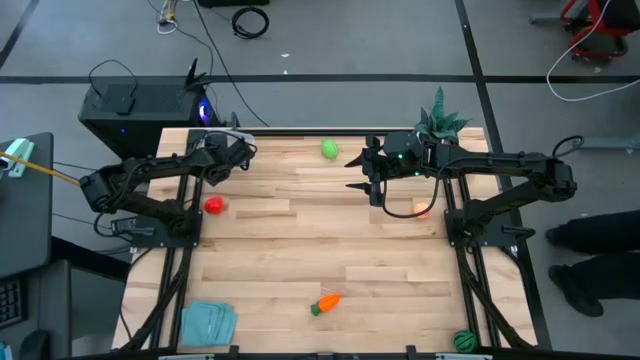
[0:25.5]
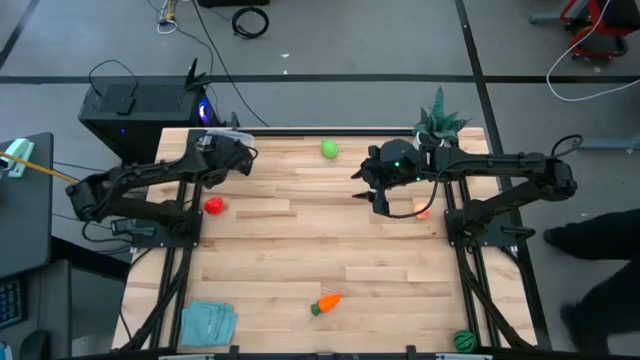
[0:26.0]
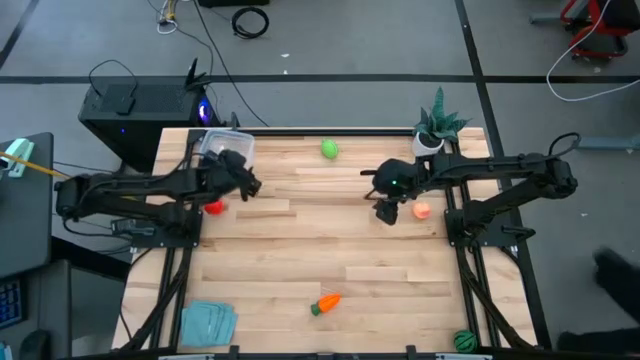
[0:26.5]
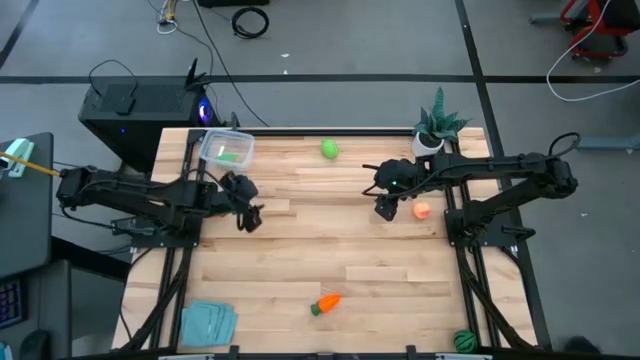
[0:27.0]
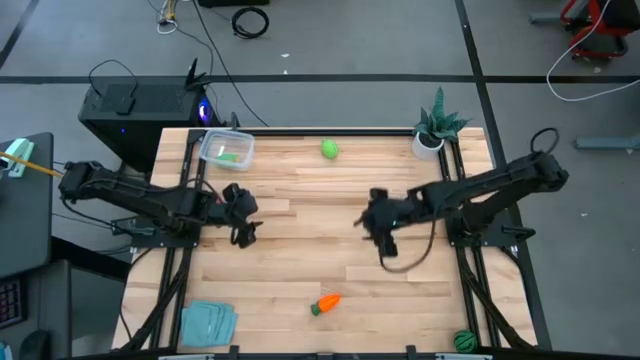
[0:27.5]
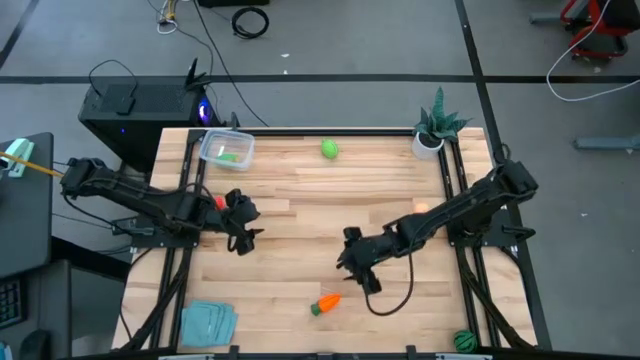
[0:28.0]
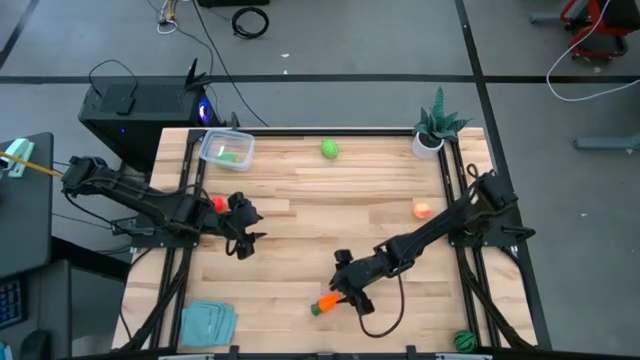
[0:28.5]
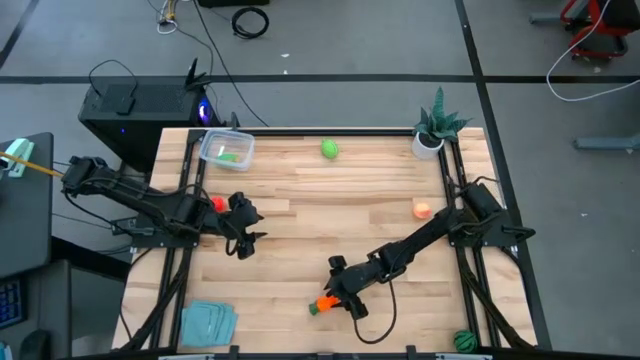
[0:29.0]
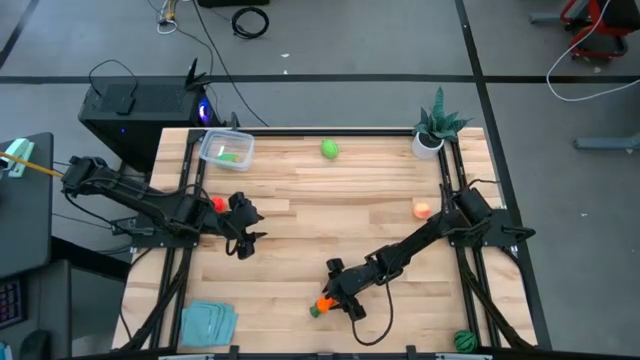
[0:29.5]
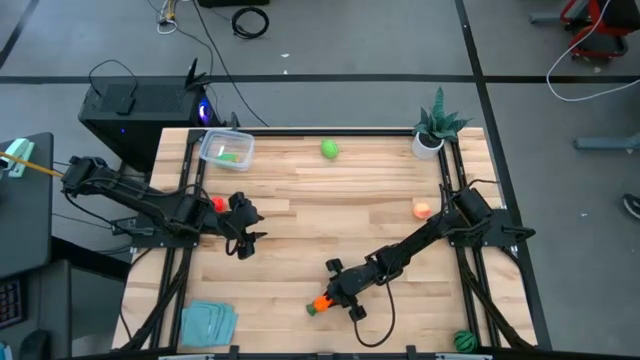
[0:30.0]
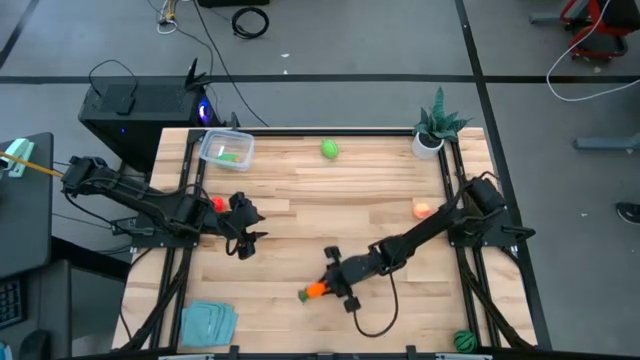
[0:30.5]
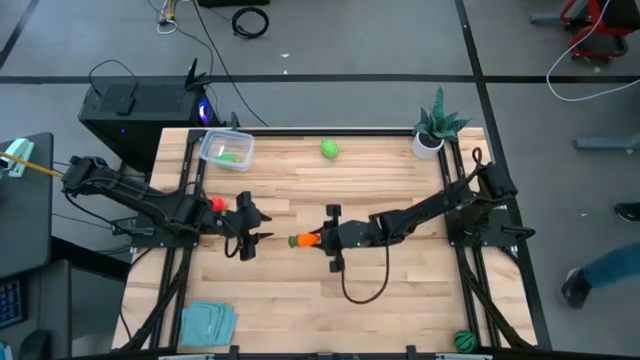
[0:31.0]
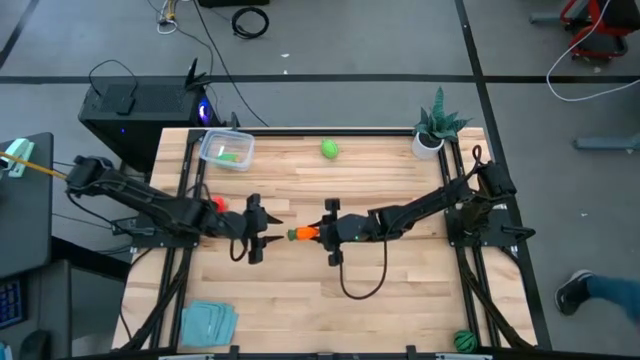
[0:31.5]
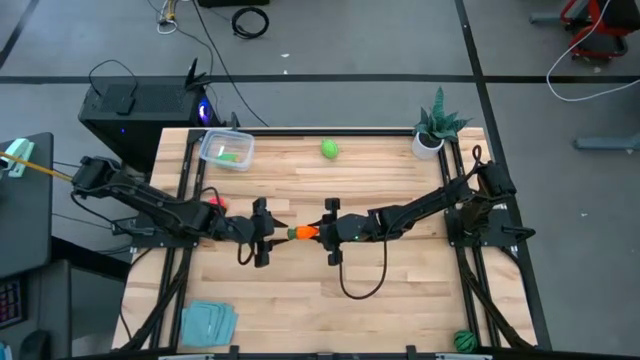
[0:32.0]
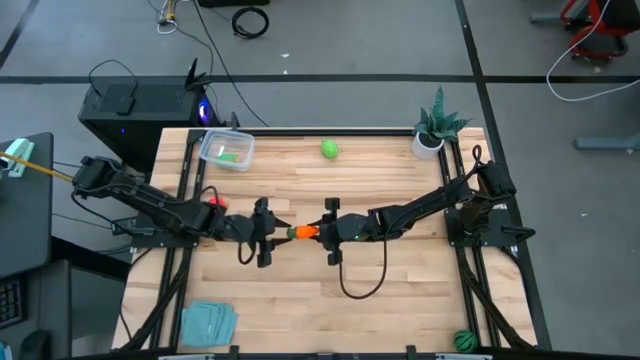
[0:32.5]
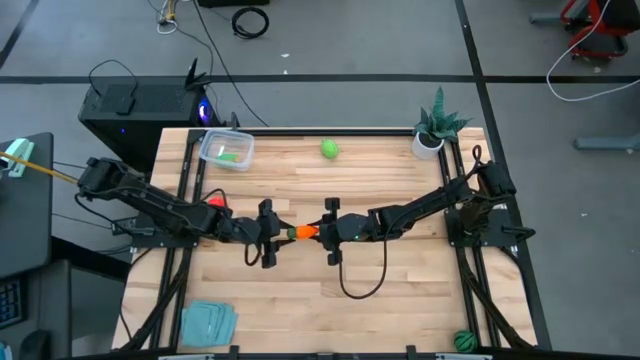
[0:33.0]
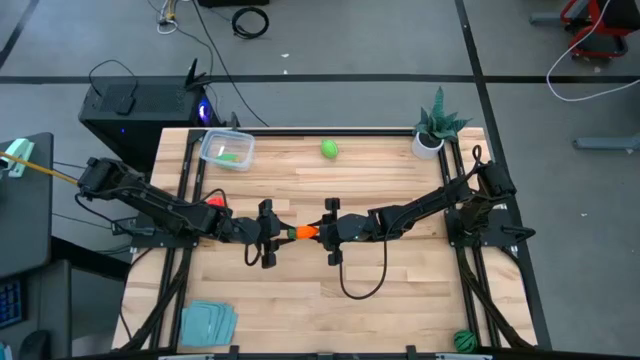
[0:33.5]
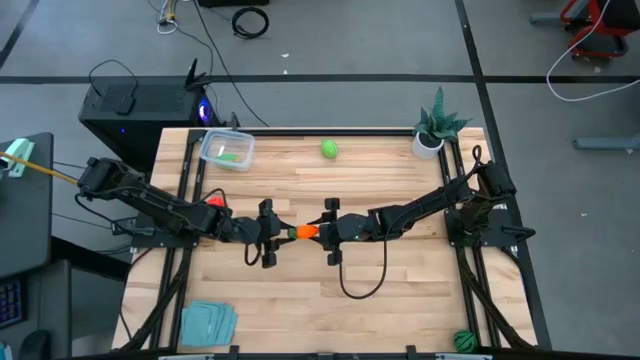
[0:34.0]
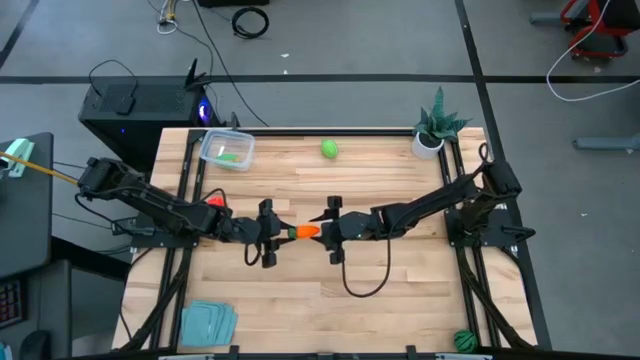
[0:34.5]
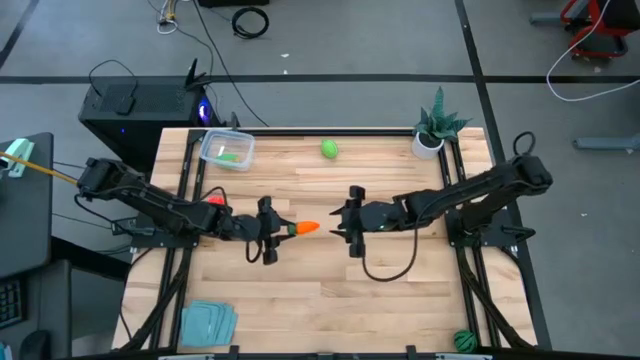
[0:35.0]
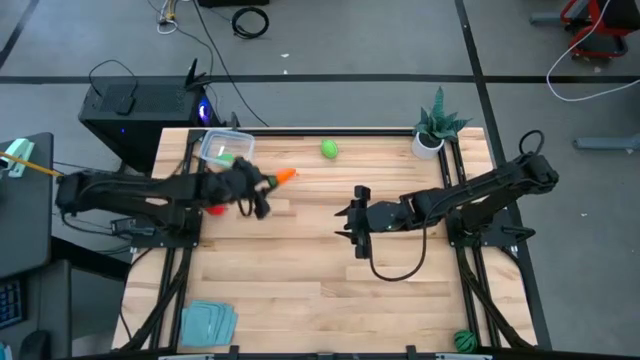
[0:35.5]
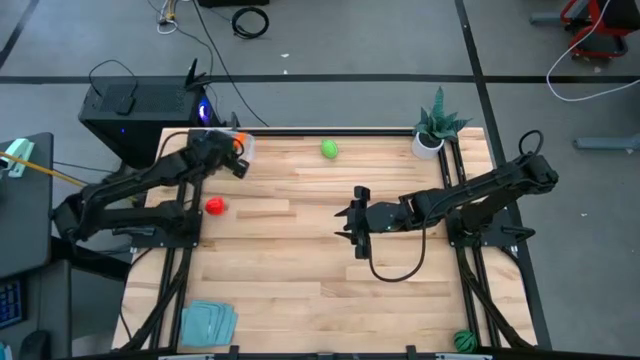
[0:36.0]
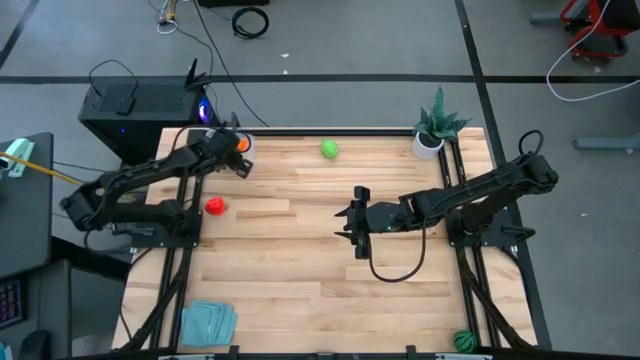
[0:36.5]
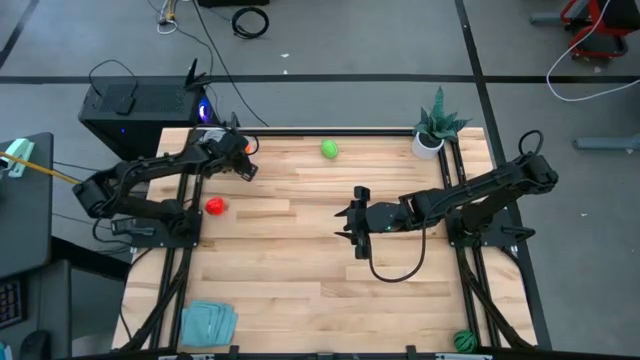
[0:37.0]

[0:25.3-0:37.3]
Task: Pick and placing Produce into tupperware
Put the orange carrot into the transparent bin

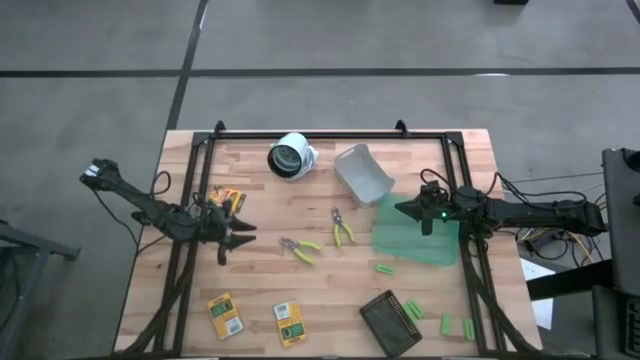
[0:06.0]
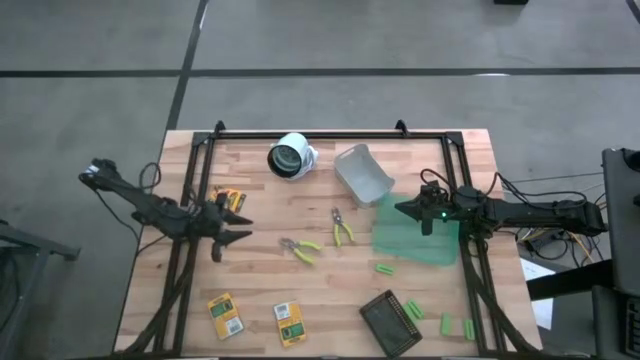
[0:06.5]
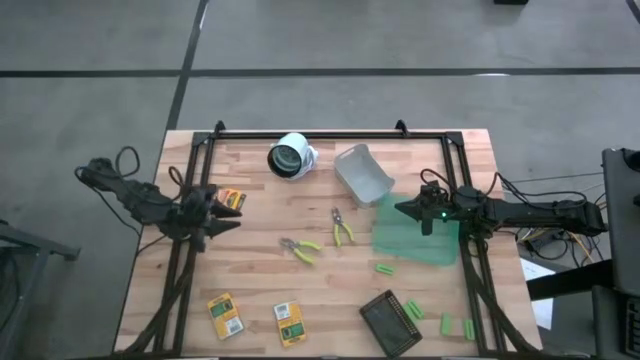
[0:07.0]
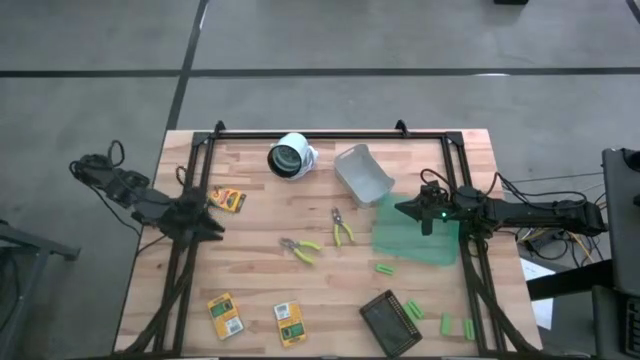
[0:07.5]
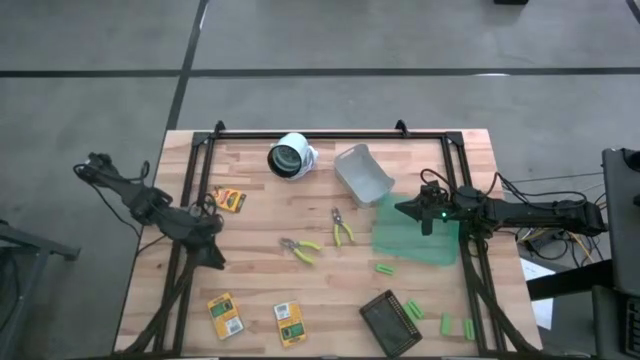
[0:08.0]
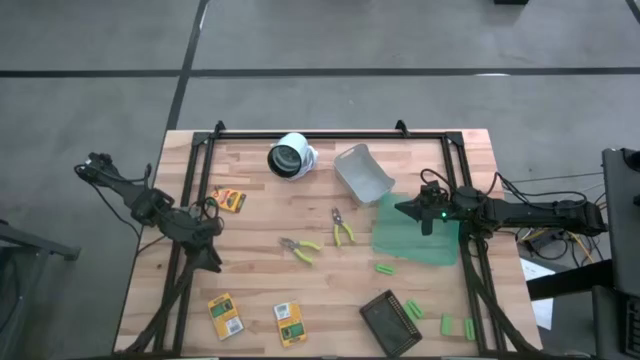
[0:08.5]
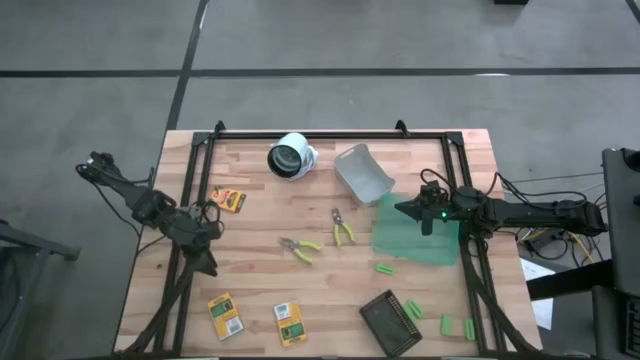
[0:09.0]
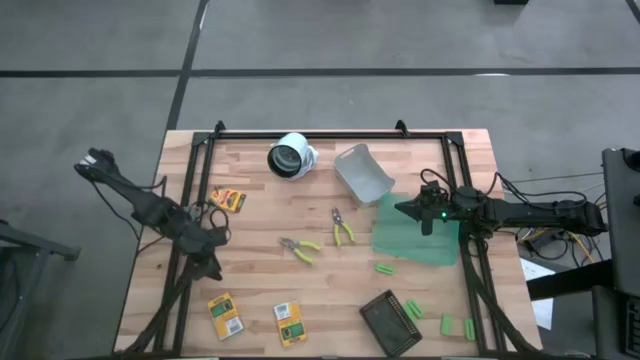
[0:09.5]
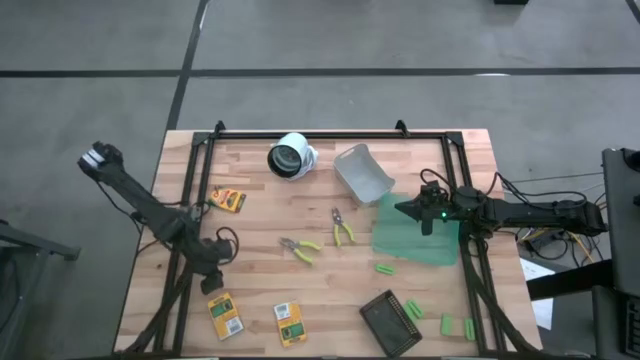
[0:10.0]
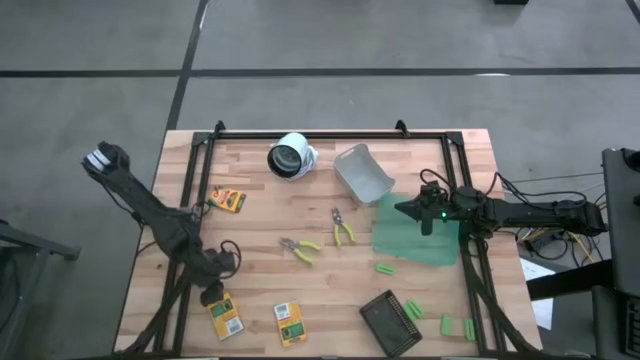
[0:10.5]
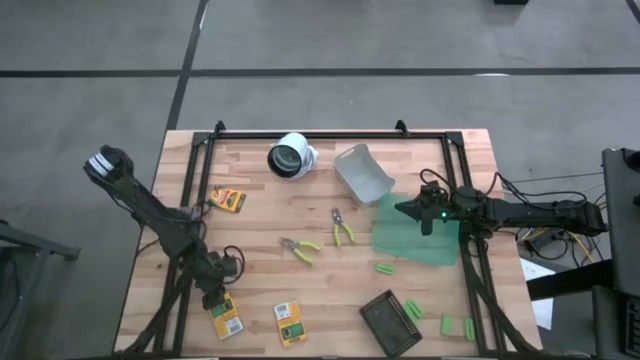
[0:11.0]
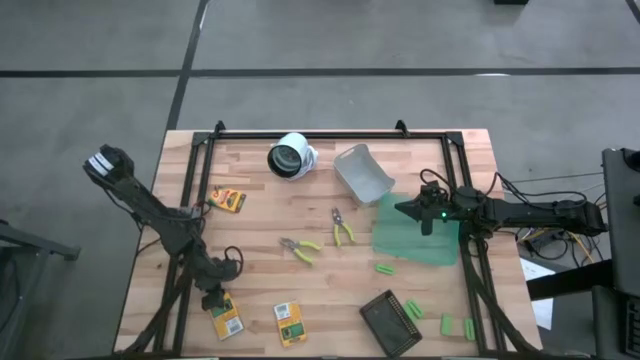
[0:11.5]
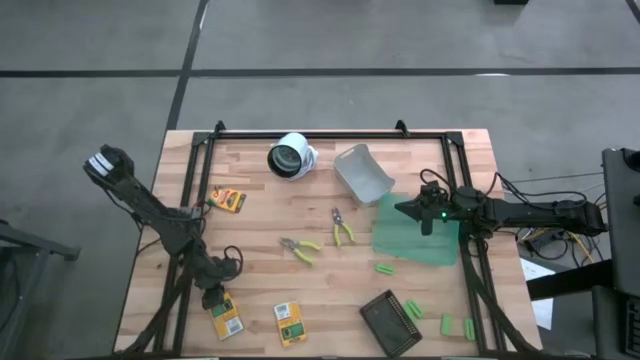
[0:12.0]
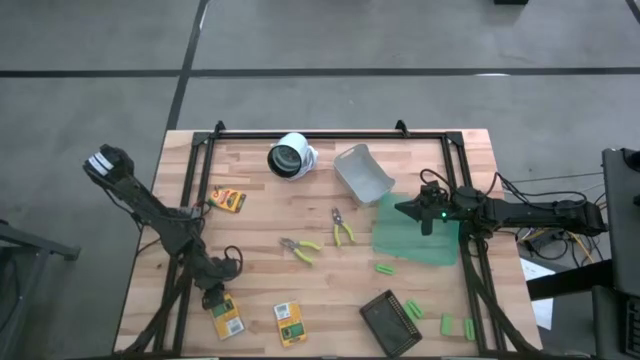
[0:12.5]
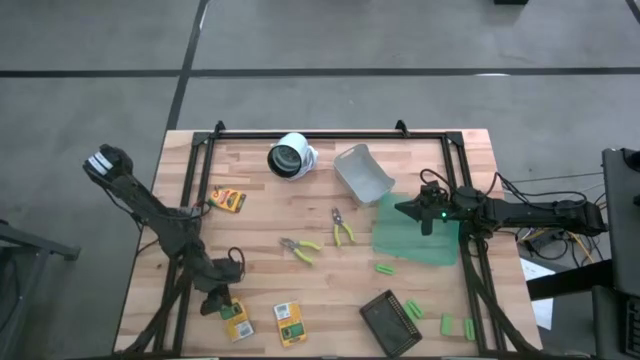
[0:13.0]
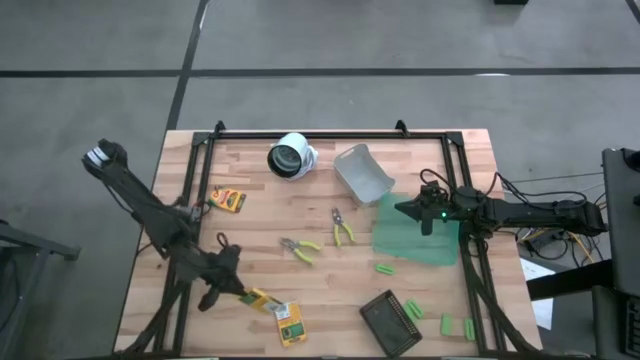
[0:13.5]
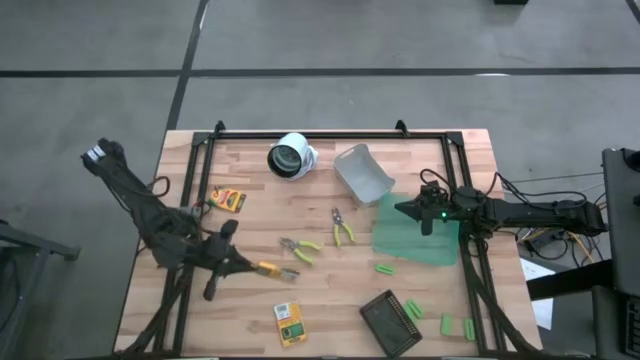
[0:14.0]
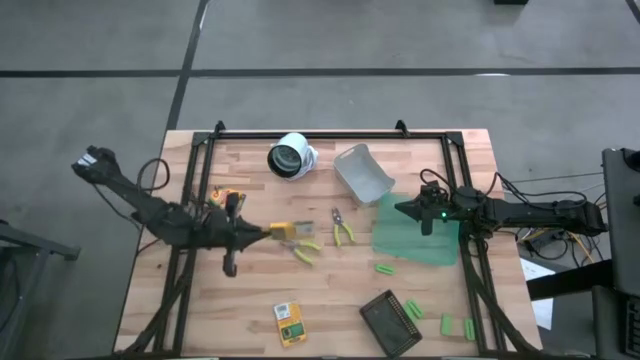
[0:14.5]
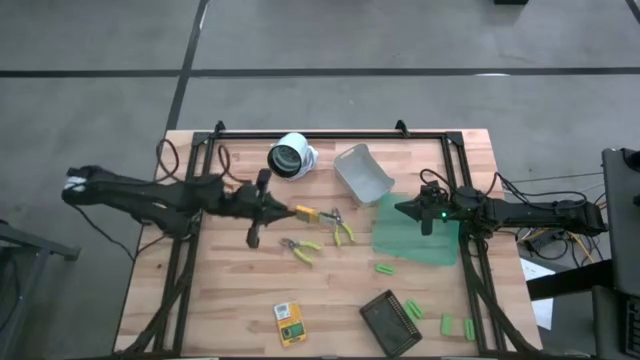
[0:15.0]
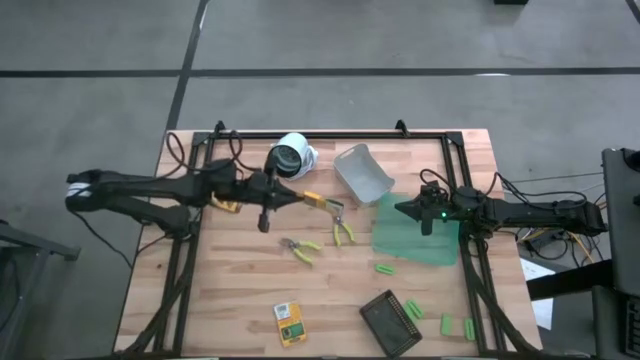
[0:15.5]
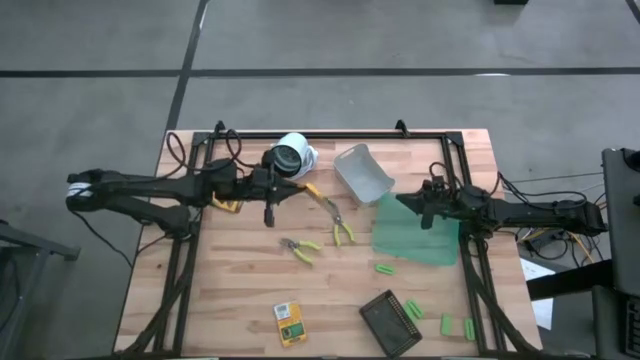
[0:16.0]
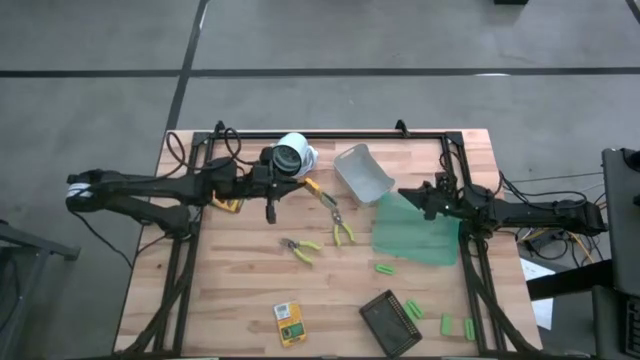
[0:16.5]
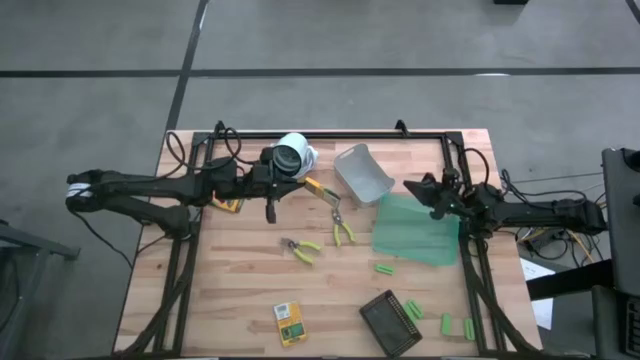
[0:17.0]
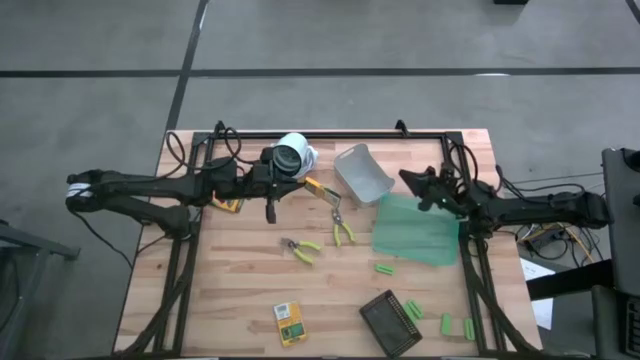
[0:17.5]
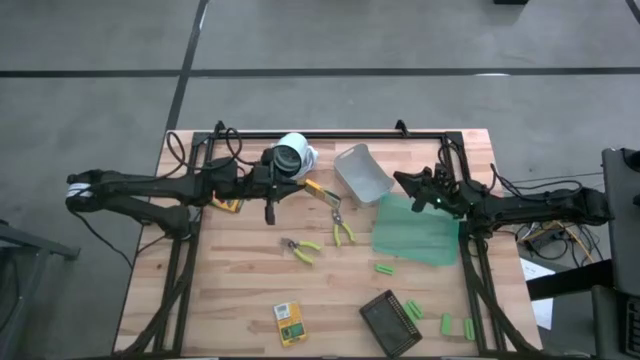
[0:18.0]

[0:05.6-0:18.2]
Task: Pick & Place School Supplies
Put the yellow crayon box into the green bin
